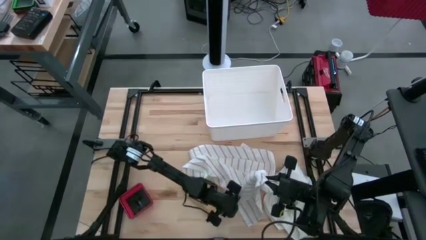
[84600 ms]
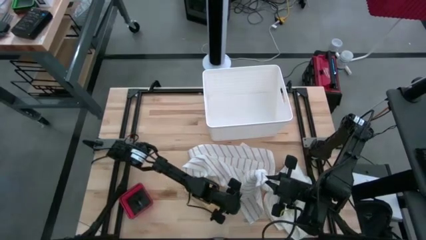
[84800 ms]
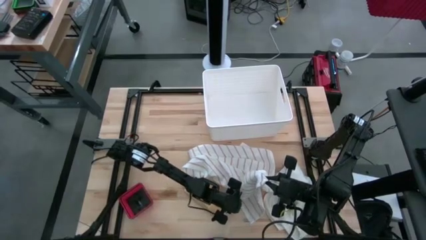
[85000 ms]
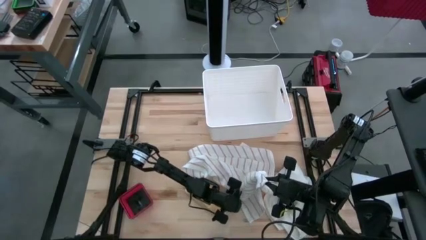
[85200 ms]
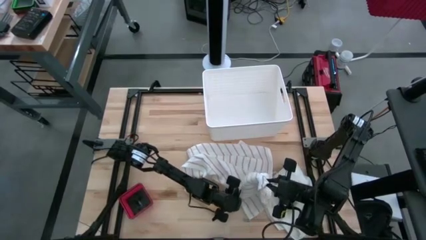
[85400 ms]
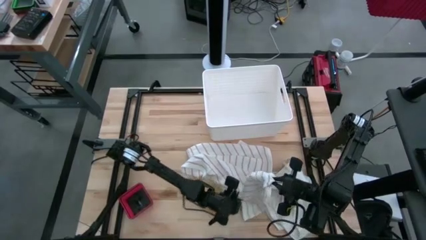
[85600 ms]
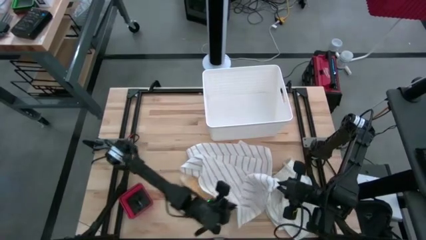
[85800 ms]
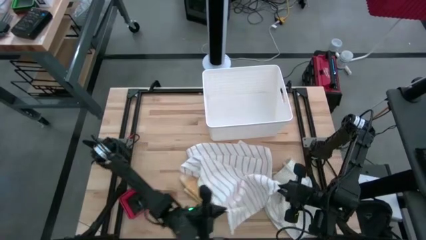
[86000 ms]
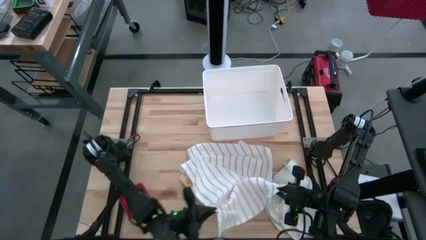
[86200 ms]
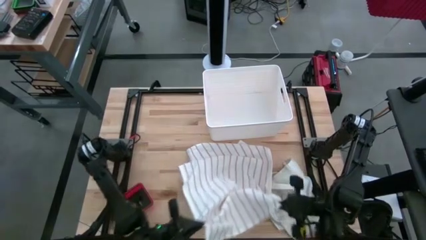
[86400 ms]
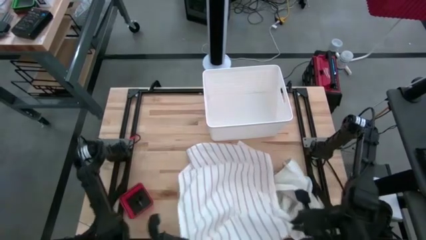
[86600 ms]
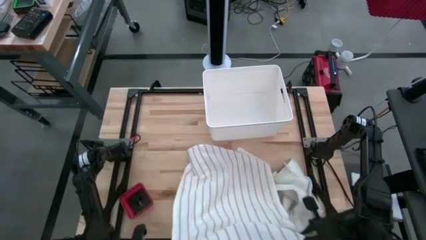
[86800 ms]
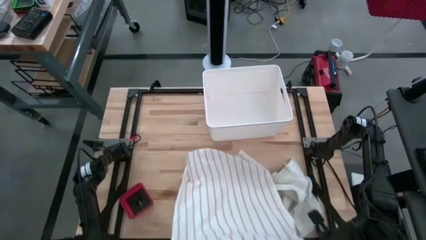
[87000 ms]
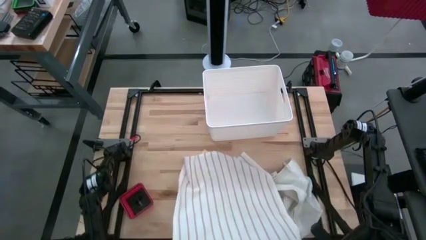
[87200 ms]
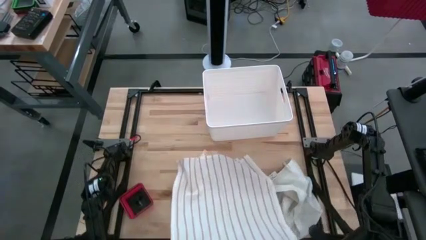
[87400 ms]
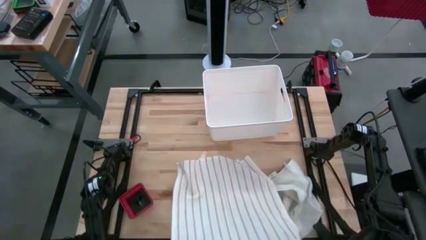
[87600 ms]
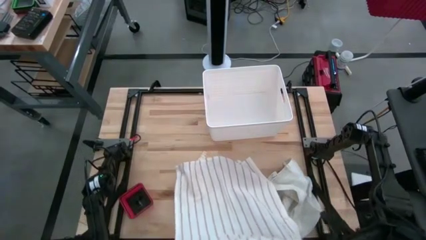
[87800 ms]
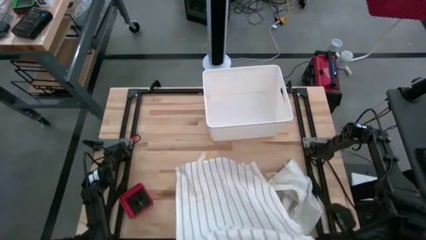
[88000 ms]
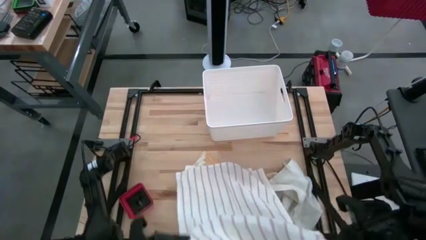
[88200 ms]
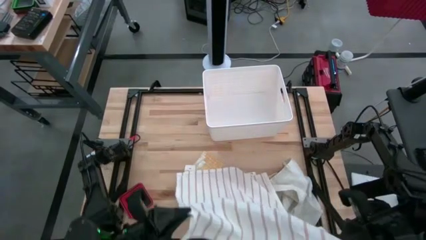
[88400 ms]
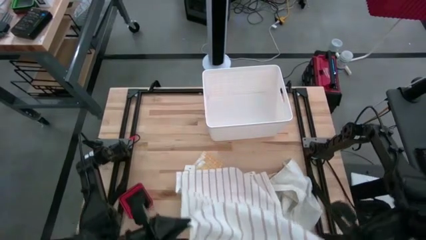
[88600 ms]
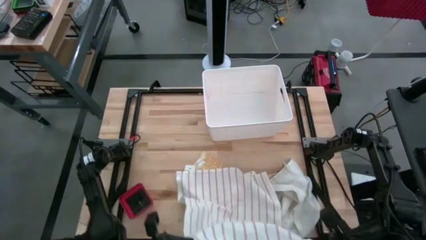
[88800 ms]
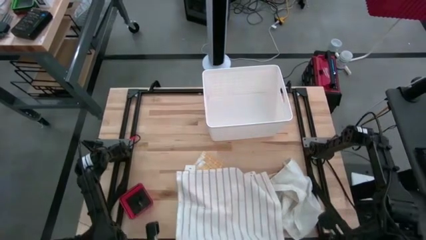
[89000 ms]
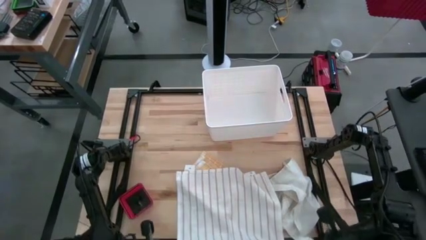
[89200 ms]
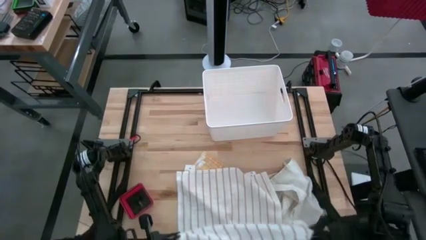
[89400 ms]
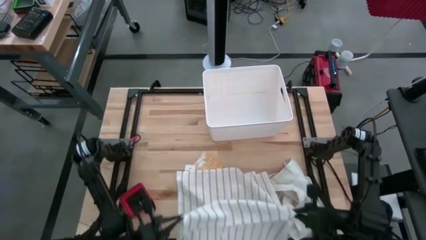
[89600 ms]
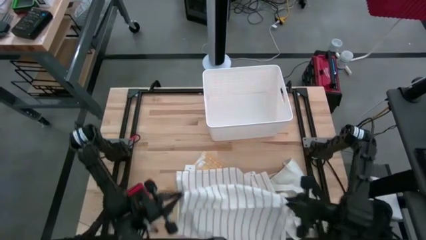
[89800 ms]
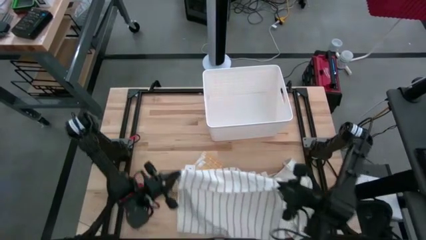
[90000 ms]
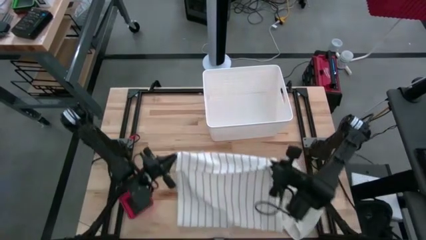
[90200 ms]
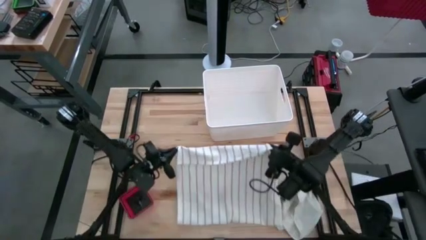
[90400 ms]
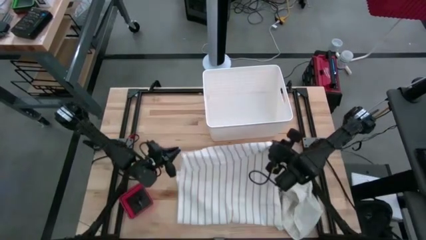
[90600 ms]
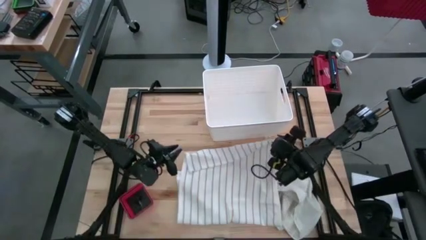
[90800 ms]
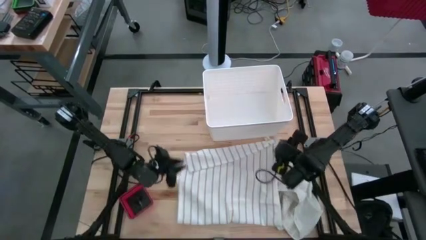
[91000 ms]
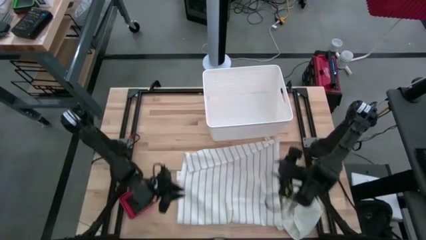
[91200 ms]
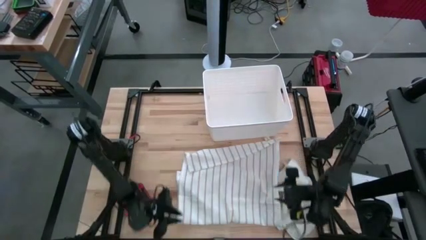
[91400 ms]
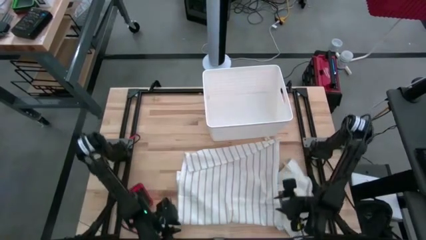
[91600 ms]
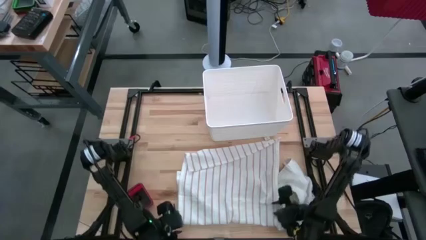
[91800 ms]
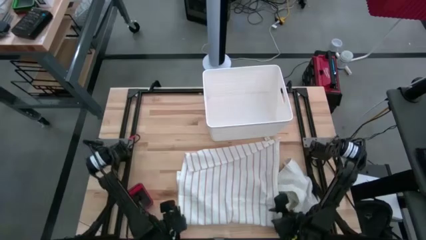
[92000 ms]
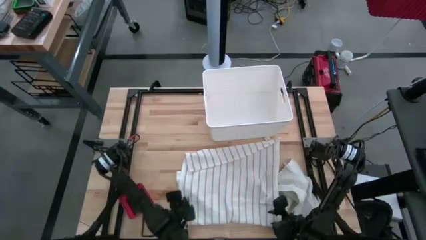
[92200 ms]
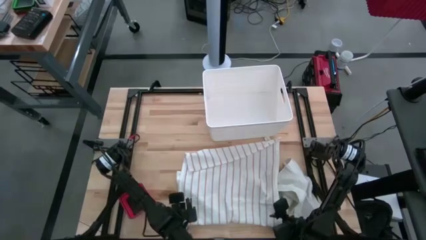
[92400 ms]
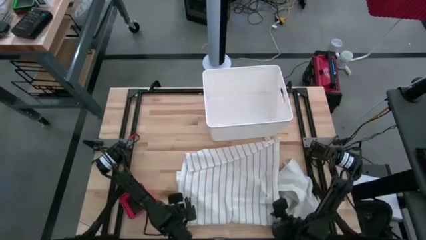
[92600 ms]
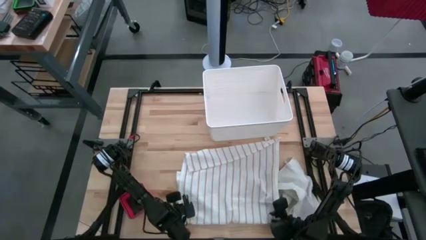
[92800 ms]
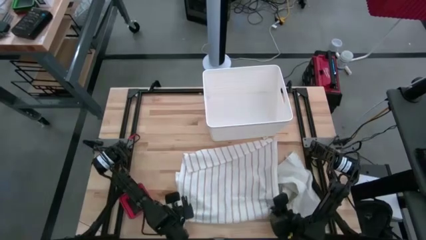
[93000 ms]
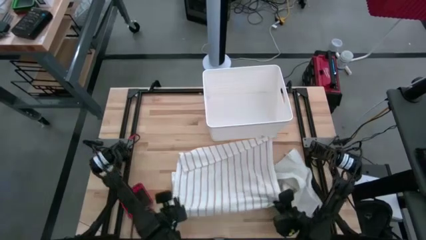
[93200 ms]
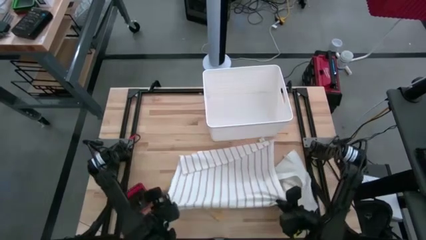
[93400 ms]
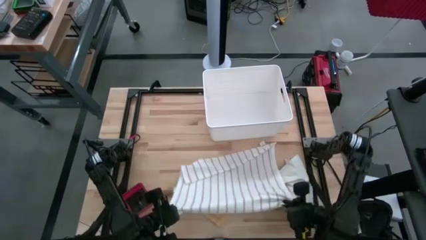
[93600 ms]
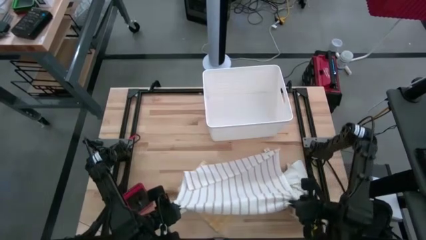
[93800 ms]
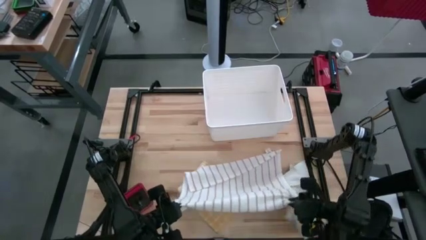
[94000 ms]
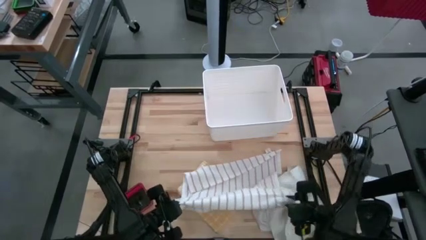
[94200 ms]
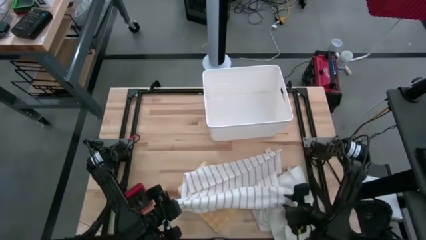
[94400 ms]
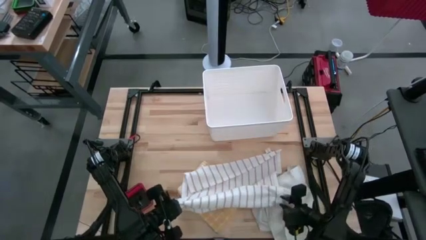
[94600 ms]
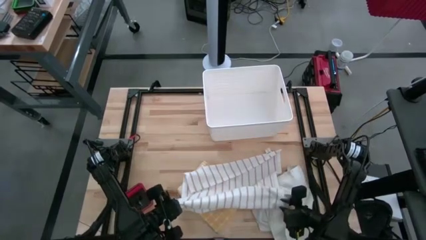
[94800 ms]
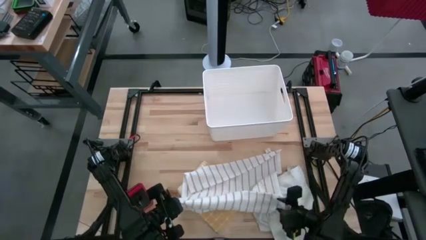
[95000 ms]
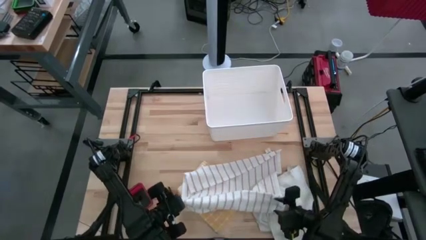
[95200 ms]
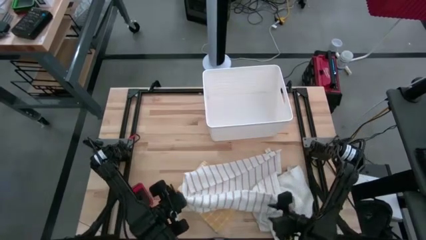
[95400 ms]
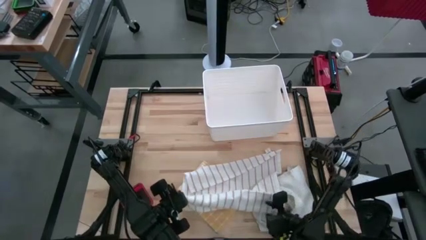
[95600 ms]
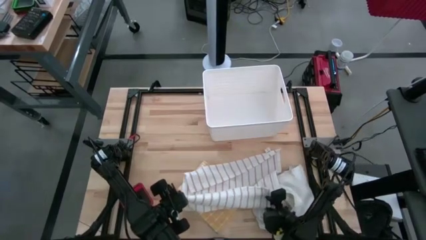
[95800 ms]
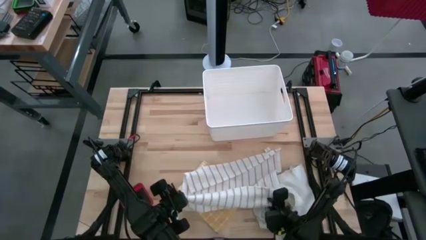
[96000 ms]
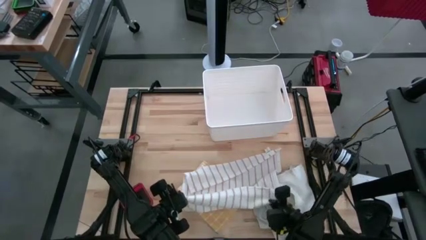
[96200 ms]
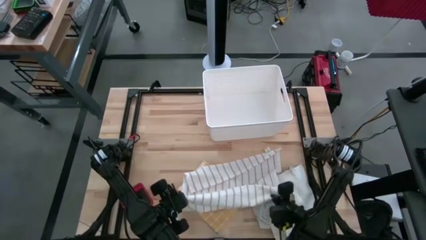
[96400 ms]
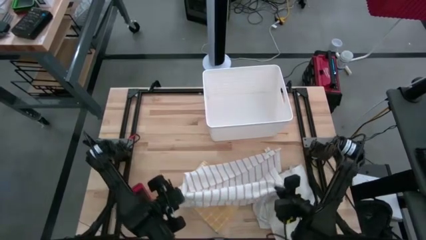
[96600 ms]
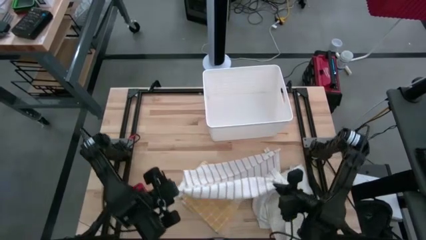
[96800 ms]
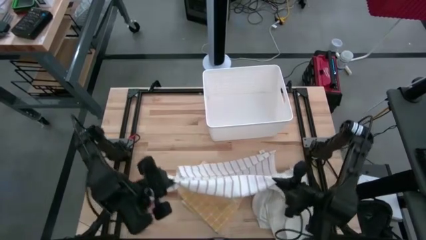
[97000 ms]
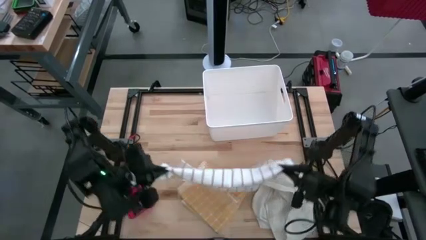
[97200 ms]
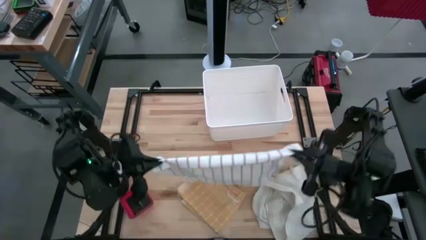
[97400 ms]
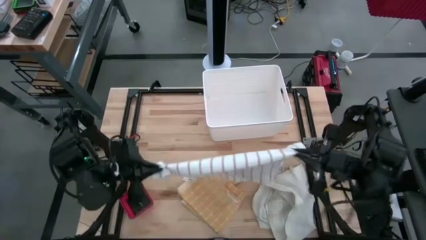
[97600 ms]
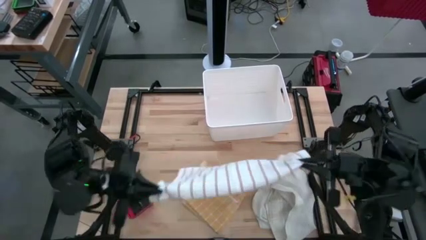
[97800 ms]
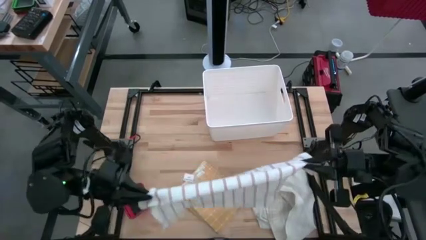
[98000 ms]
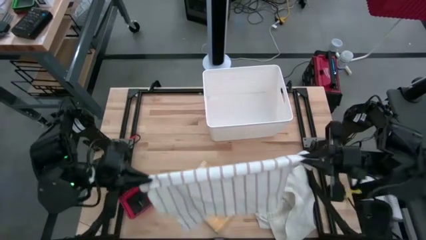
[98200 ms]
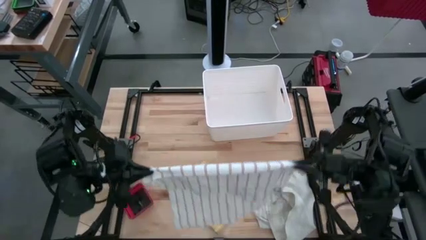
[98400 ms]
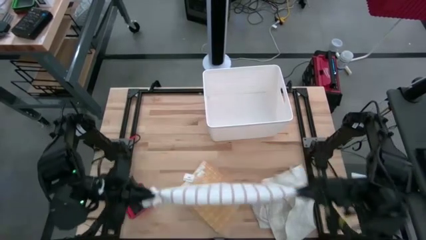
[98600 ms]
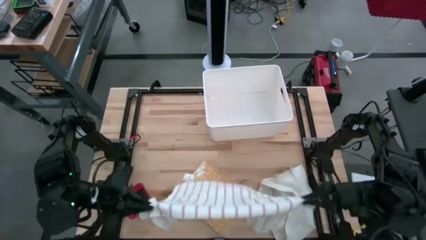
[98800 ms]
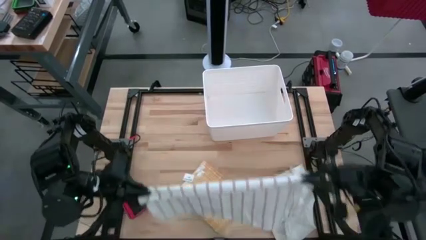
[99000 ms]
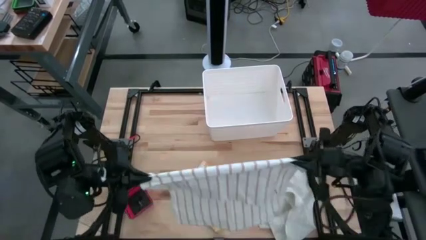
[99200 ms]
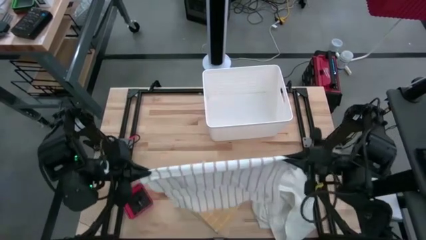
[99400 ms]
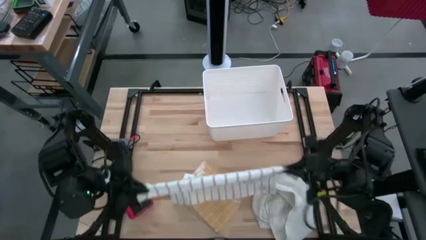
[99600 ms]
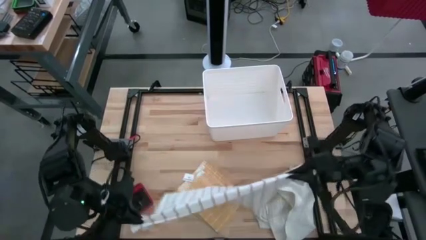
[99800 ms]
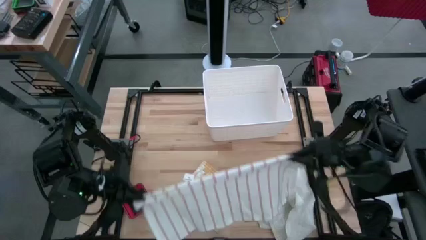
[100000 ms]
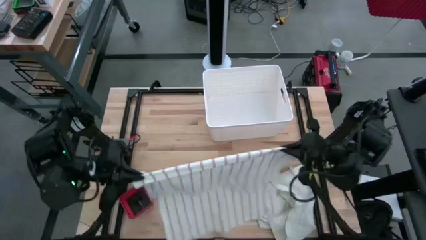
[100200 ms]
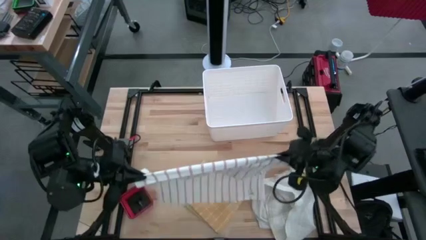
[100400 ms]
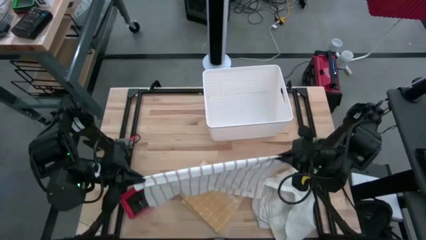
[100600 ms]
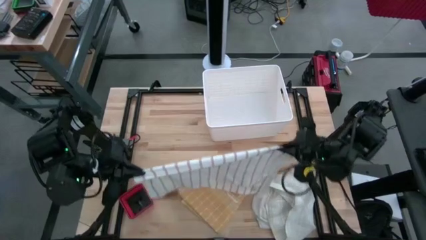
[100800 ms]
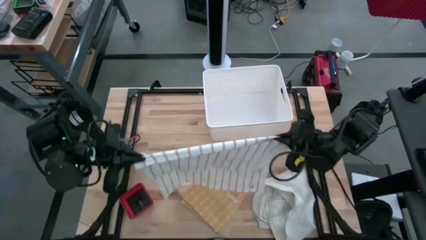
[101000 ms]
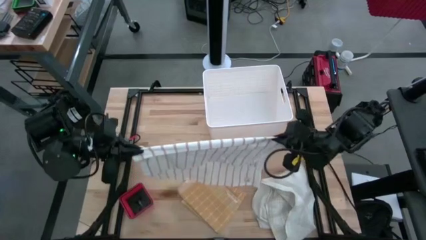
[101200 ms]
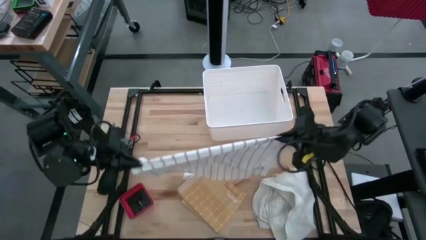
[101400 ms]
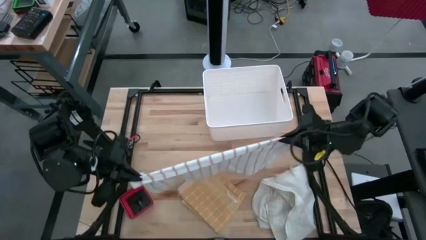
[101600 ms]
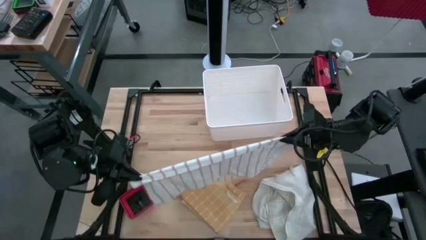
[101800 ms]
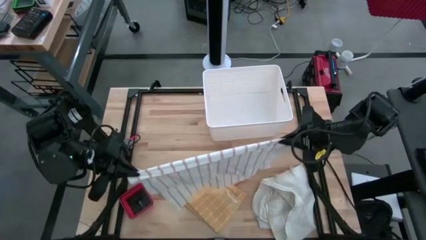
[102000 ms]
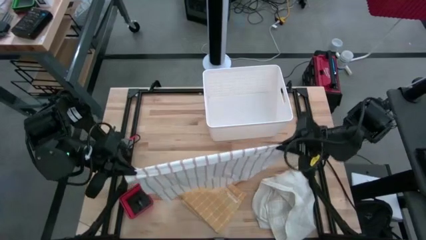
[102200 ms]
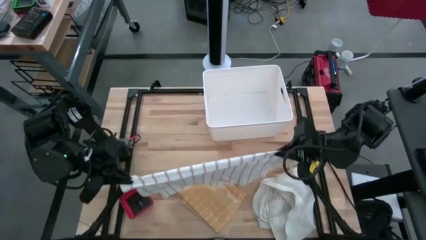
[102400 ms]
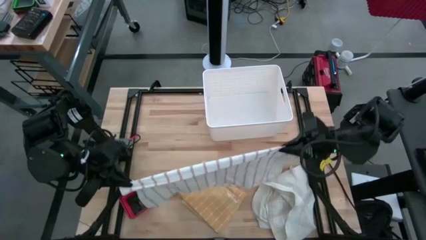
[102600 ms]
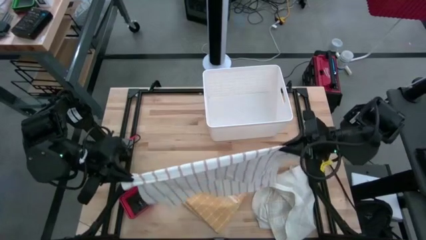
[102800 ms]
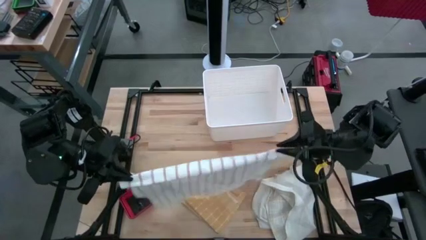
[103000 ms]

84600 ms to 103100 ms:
Task: Fold towel
Fold the brown patterned towel
